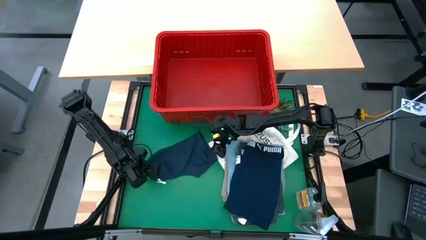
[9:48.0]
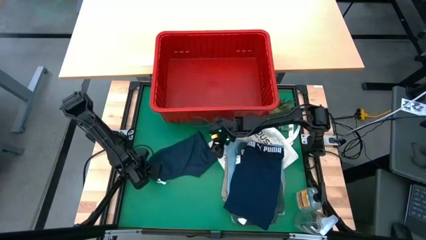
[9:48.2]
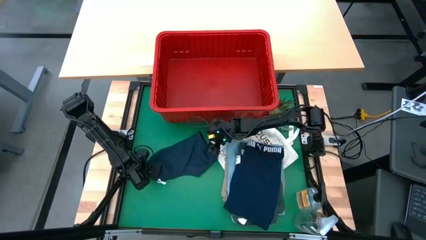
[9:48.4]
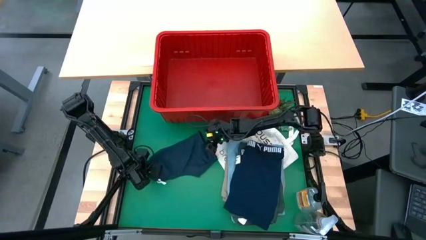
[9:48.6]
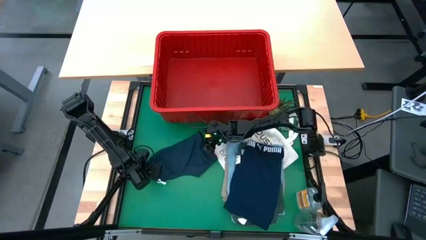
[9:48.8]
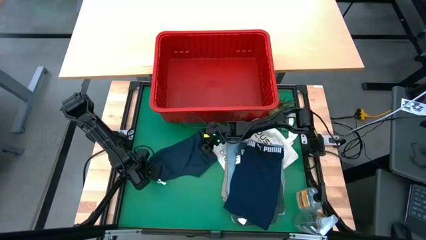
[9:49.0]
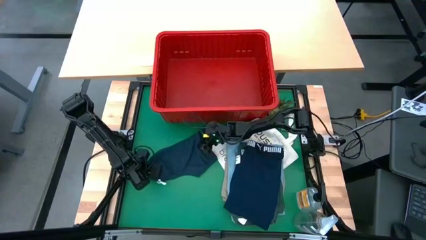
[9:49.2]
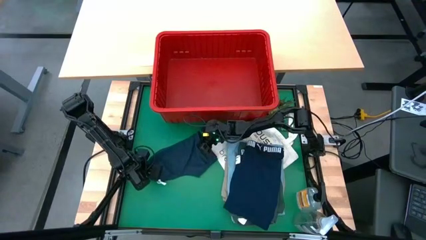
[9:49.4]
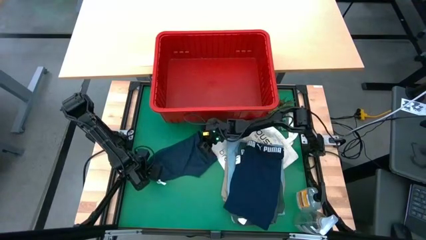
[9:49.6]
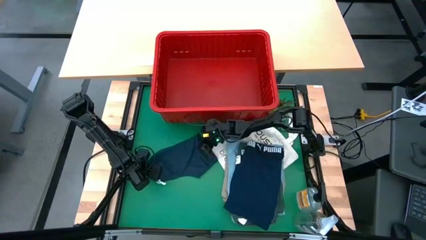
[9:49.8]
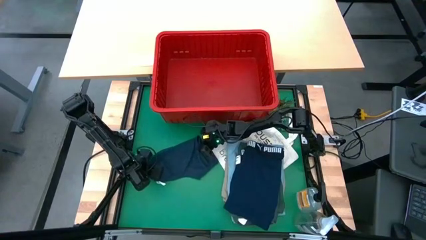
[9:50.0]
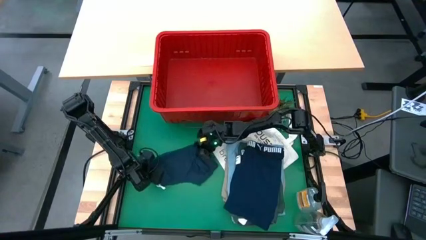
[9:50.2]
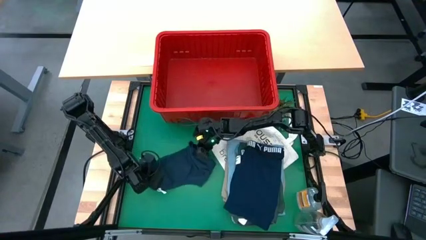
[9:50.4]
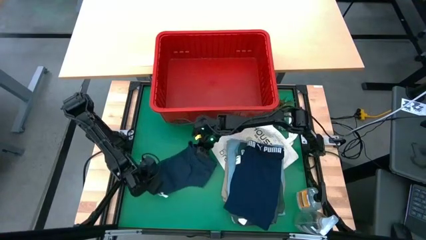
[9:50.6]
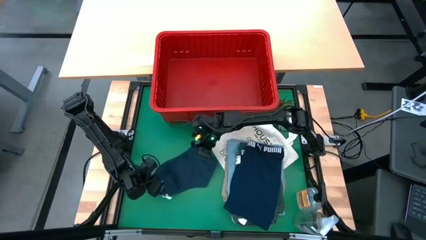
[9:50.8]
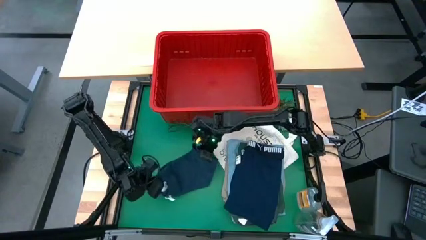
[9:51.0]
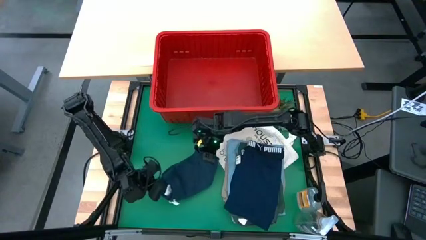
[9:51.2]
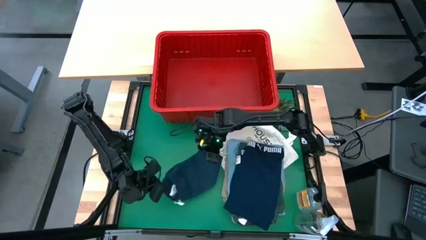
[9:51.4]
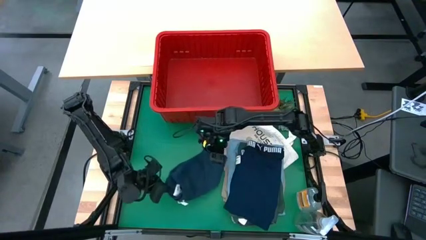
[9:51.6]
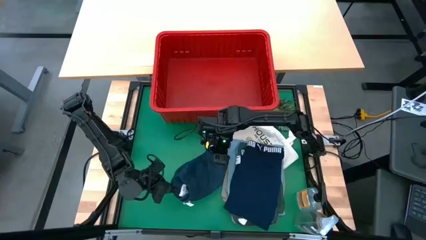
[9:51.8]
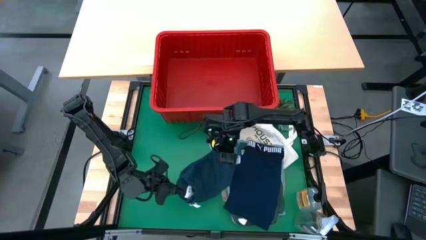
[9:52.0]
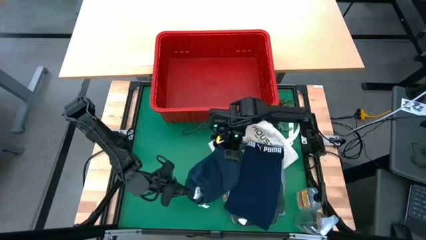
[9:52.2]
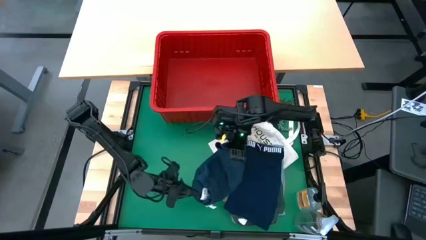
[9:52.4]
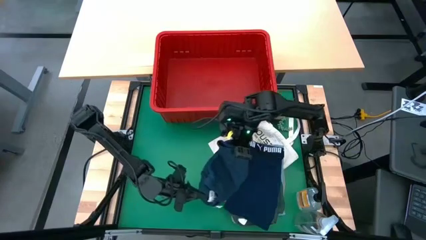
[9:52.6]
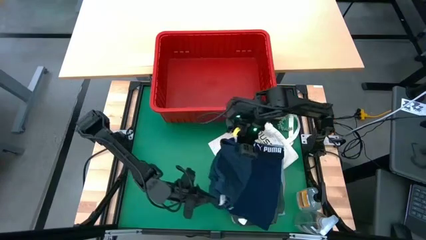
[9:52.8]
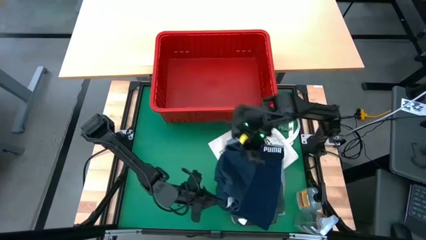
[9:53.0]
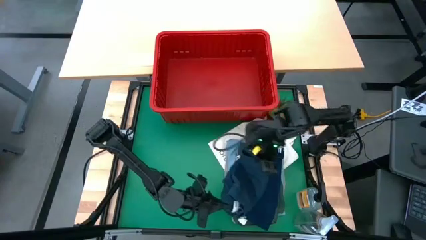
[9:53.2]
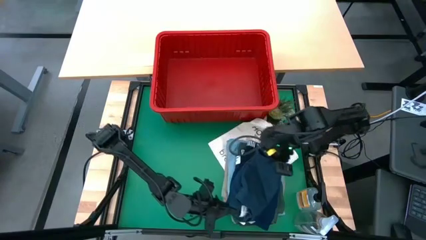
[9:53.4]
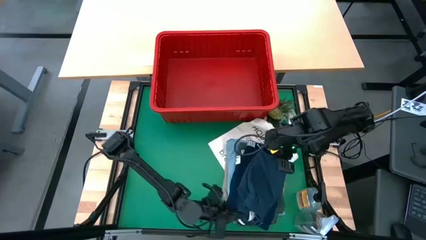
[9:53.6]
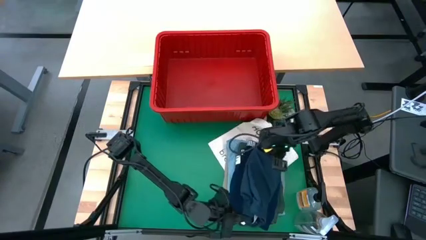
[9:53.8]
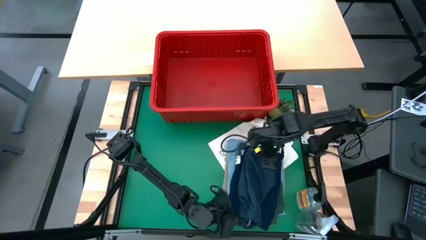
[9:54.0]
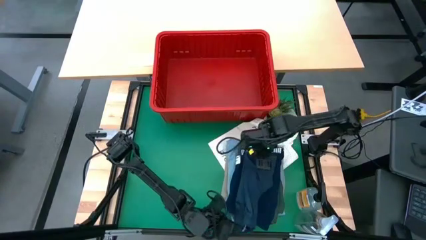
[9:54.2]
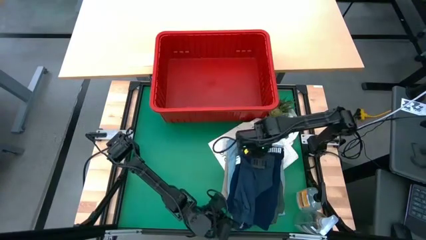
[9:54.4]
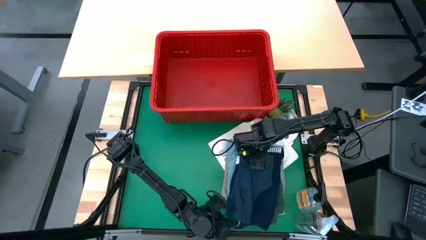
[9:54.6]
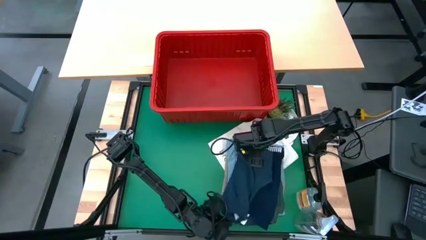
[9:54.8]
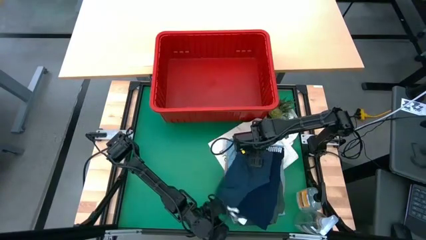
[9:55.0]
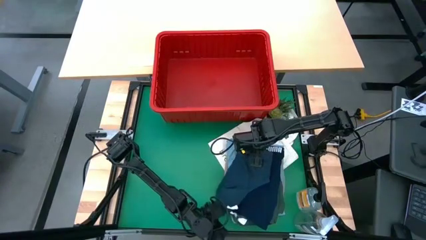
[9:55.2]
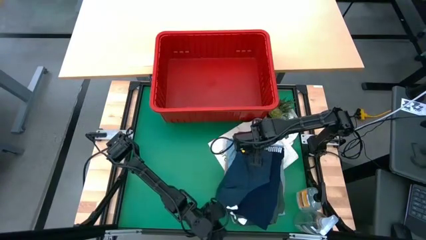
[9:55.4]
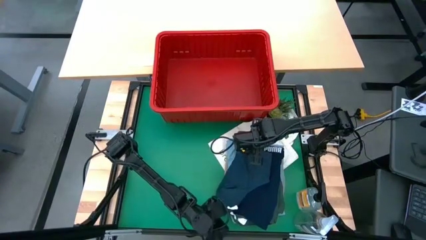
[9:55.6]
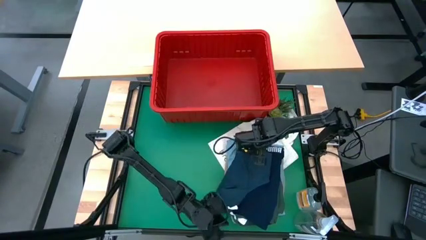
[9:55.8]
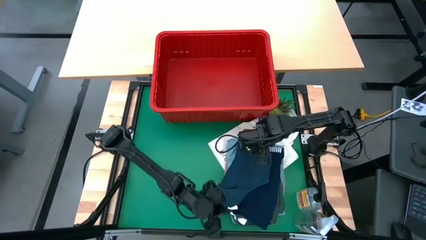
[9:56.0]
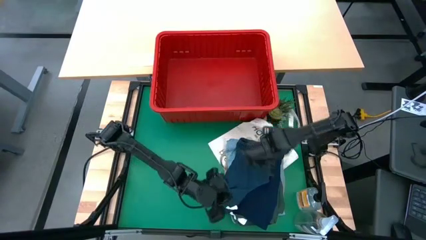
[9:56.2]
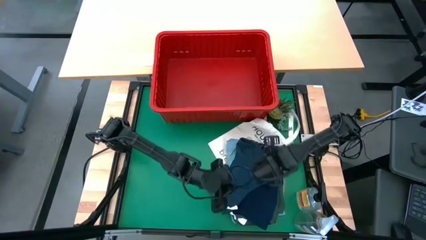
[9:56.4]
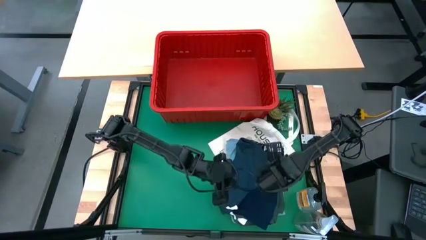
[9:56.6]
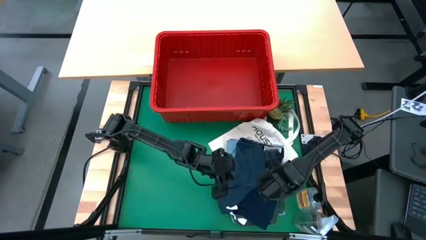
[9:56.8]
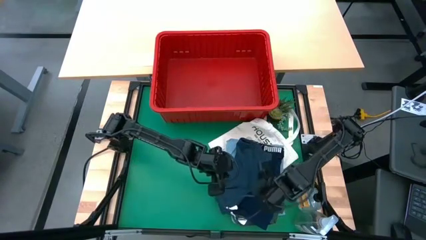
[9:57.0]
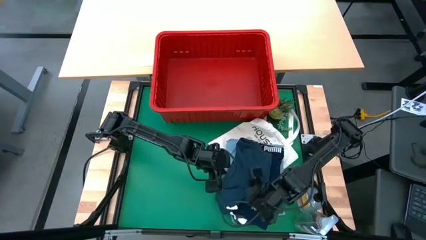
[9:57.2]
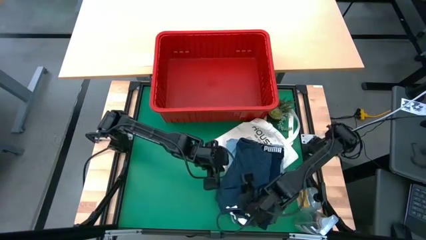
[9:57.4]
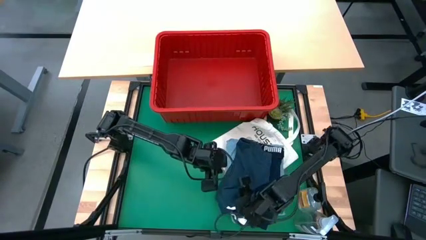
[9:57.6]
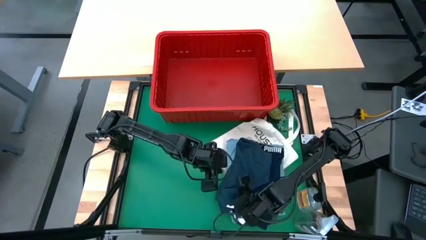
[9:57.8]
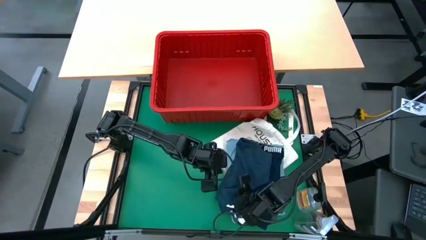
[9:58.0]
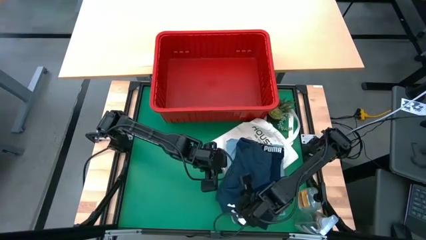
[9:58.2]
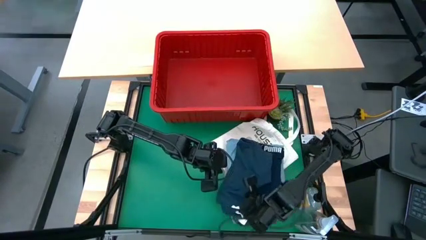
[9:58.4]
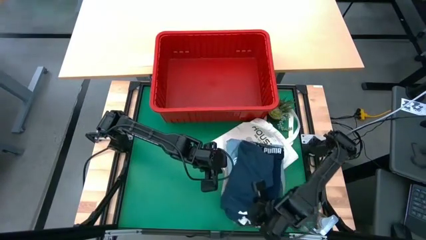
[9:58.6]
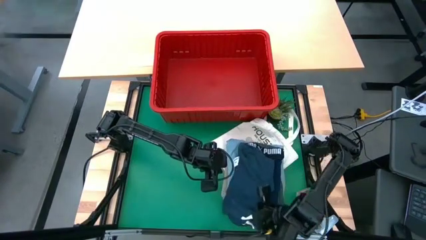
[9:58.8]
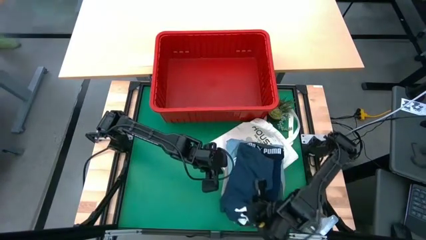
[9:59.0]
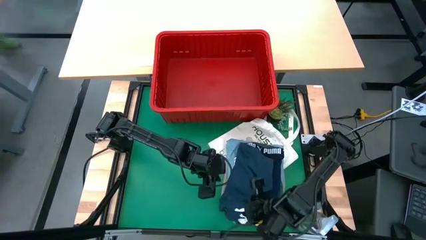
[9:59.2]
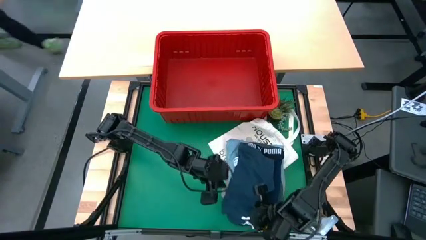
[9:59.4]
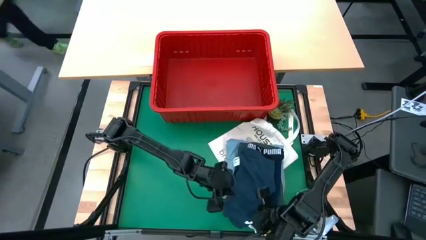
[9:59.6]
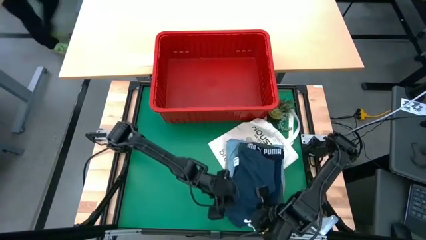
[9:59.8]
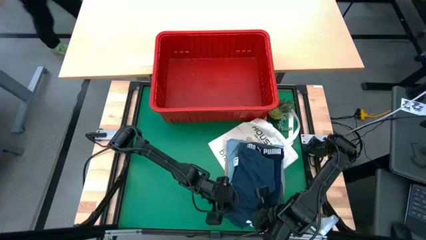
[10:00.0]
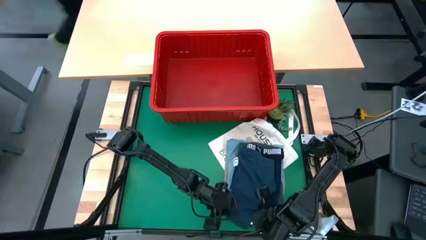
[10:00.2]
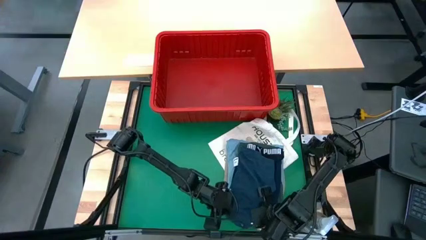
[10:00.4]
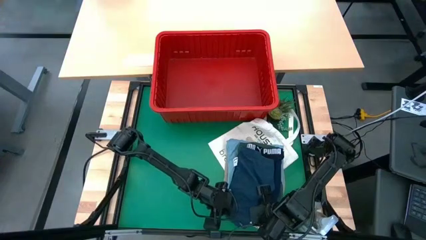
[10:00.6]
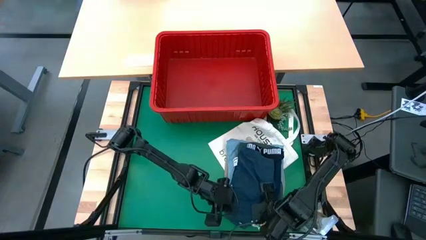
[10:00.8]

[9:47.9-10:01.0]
Task: Fold Laundry from Bin
Stack the dark gray shorts on top of the dark blue boxer

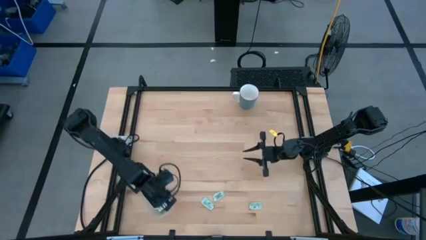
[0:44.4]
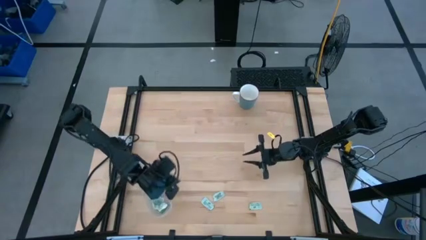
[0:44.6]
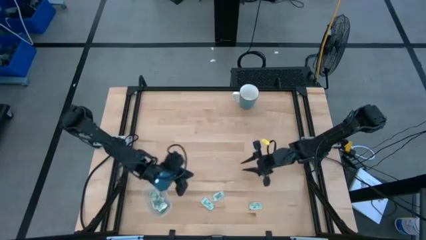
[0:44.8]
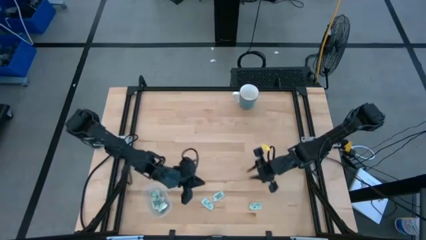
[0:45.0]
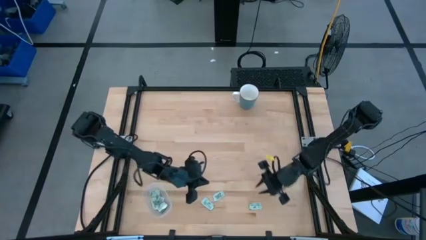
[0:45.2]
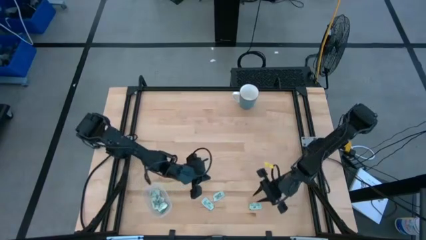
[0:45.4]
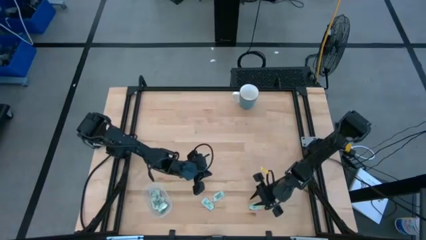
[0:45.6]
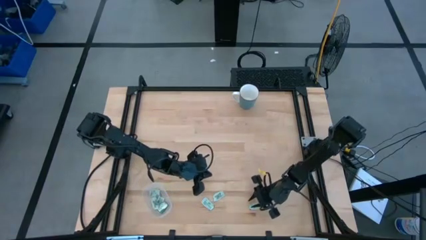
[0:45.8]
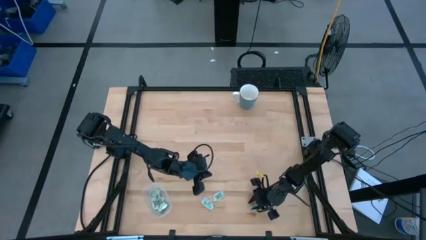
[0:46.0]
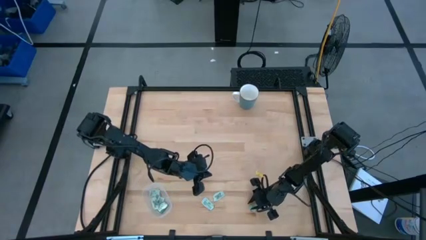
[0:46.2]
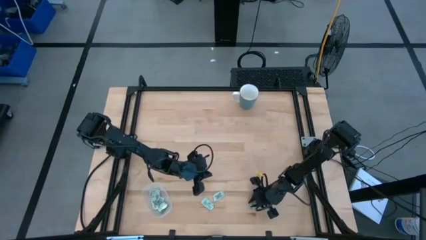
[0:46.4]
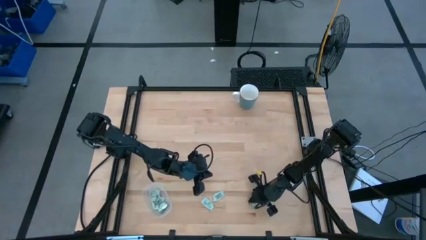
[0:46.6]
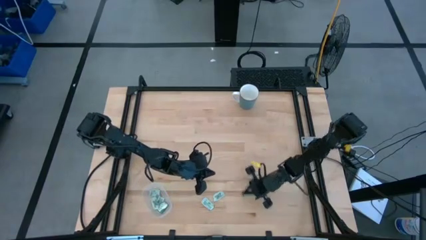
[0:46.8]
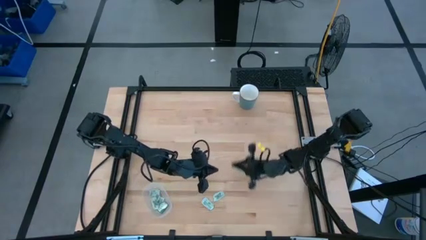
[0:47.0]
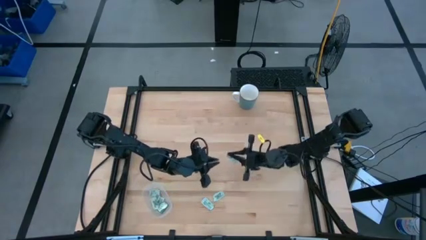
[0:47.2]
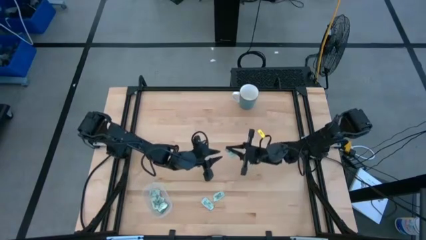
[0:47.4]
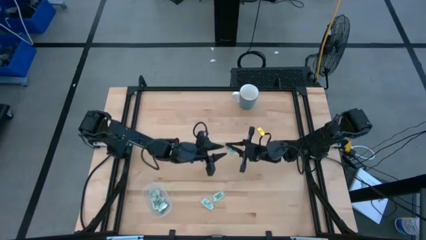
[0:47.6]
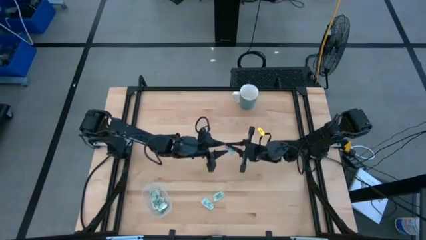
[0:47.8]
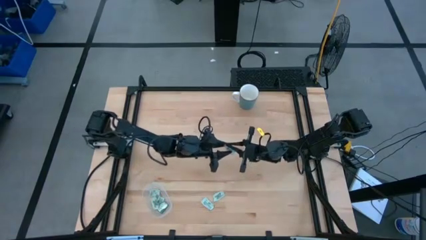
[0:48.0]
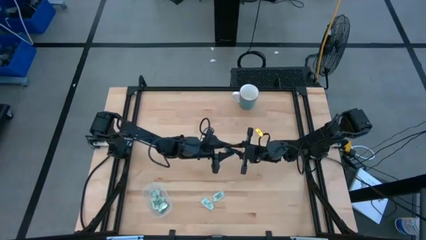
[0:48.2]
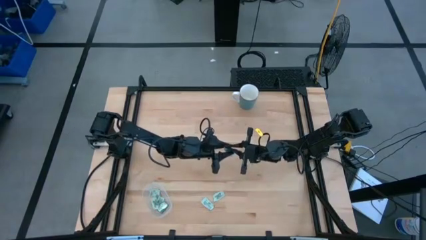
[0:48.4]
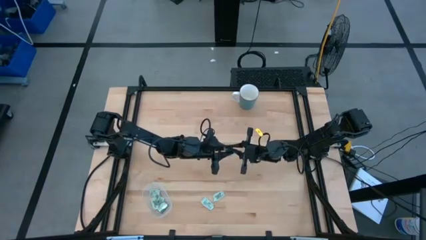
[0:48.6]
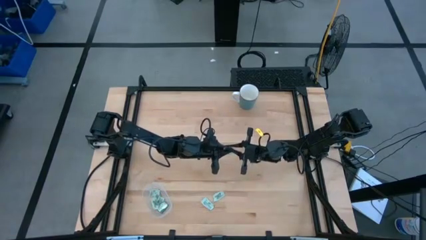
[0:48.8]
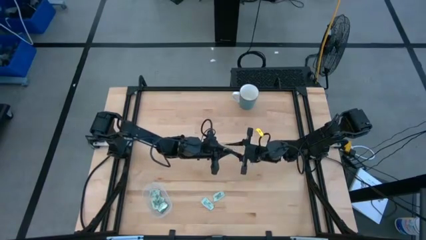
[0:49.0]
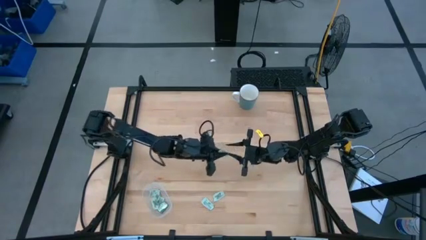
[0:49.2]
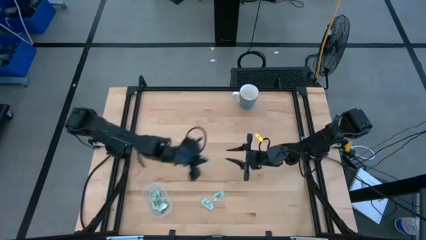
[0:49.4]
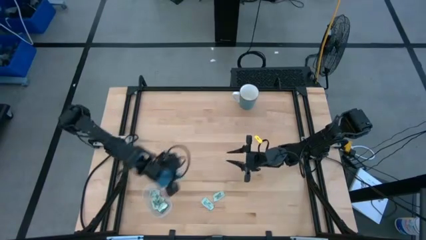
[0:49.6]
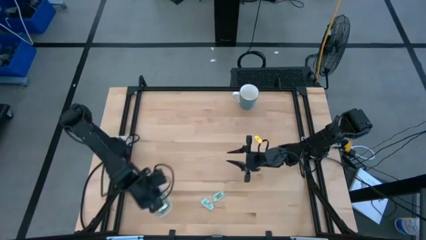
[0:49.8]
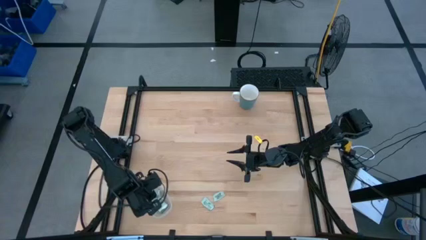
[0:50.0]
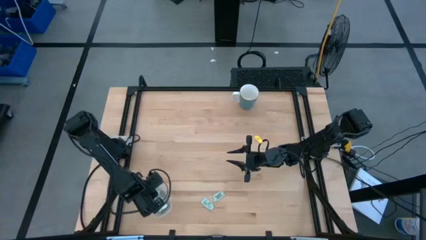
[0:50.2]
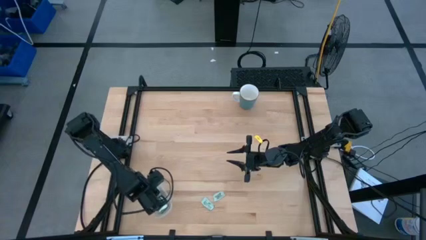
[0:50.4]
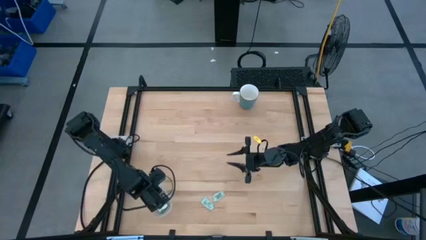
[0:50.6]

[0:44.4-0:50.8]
Task: Pick and place Stevia / Truvia into bins
Put the stevia packet into the transparent container
